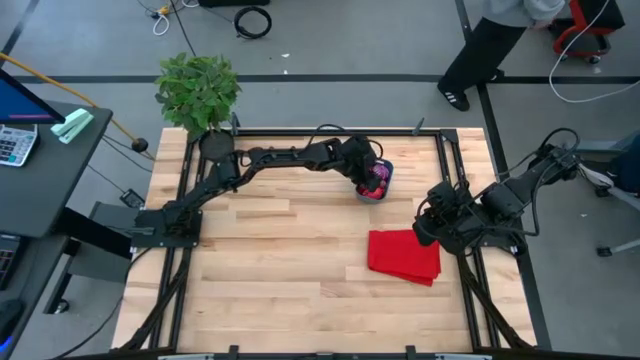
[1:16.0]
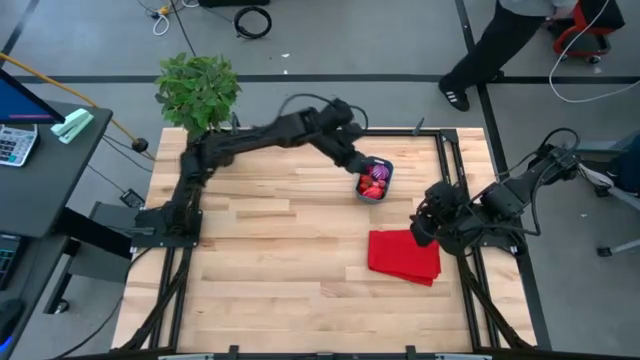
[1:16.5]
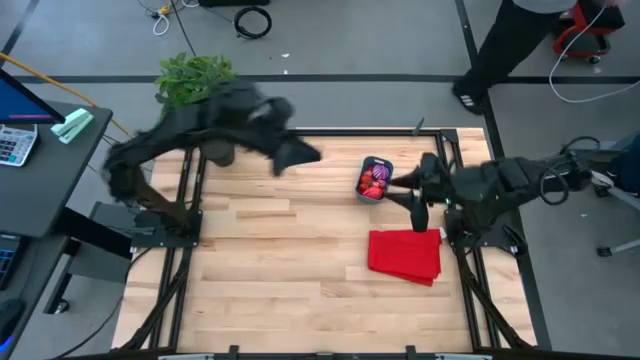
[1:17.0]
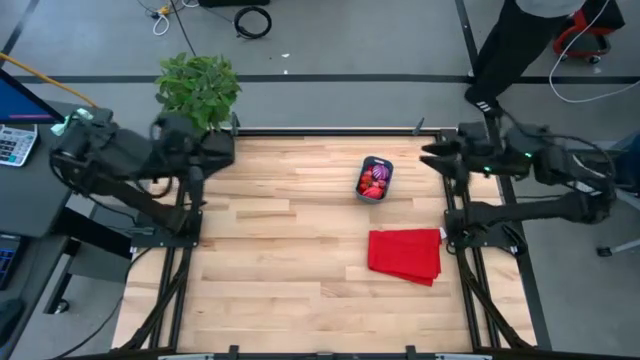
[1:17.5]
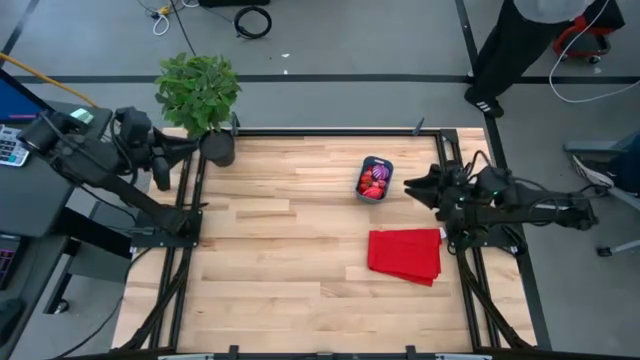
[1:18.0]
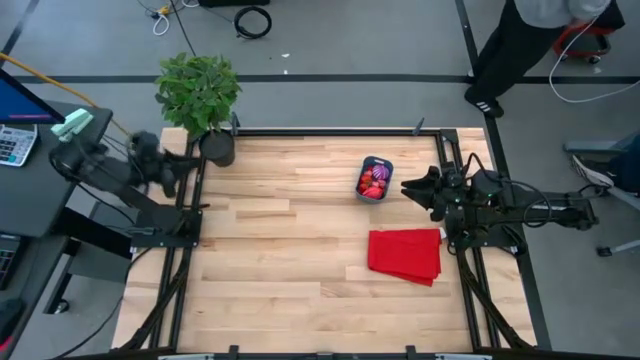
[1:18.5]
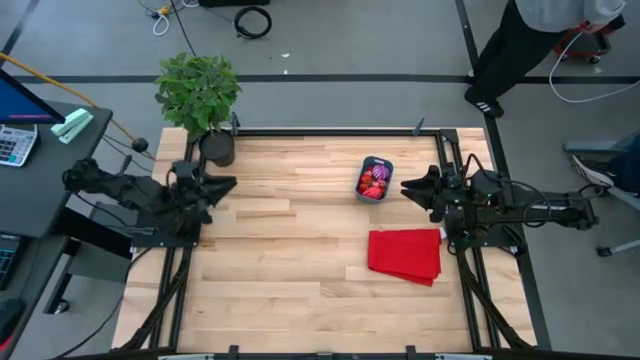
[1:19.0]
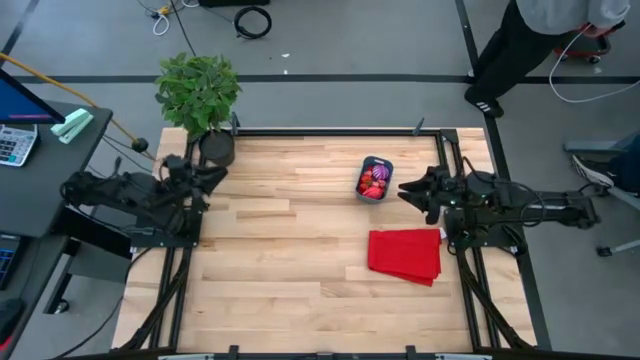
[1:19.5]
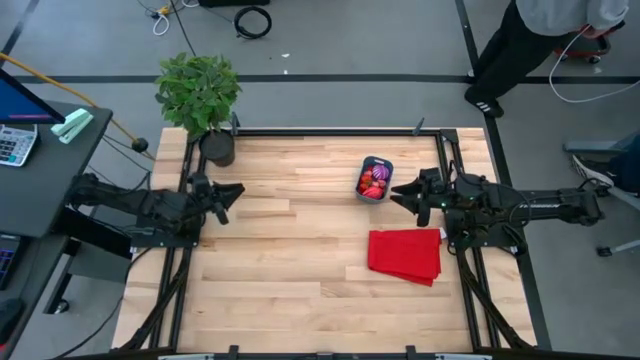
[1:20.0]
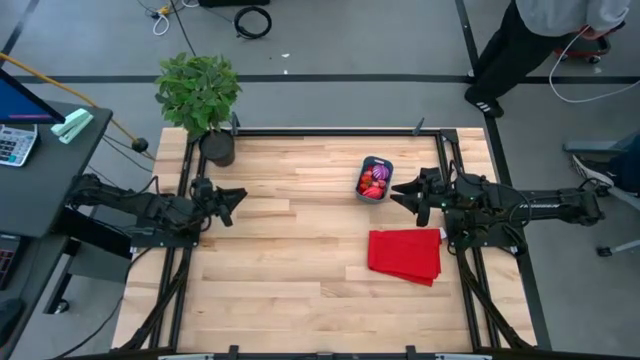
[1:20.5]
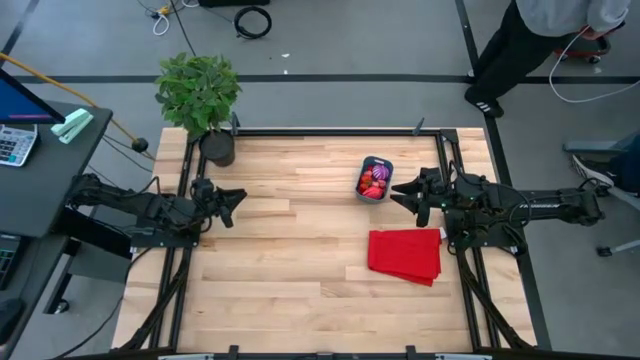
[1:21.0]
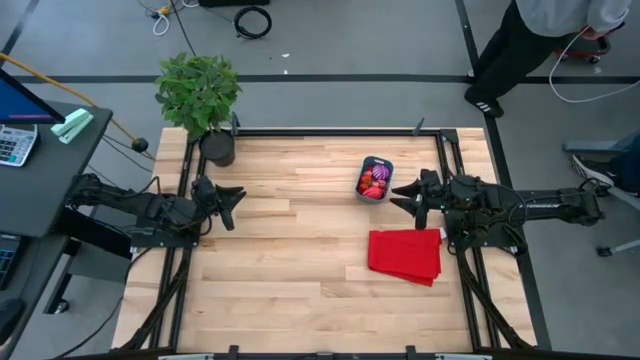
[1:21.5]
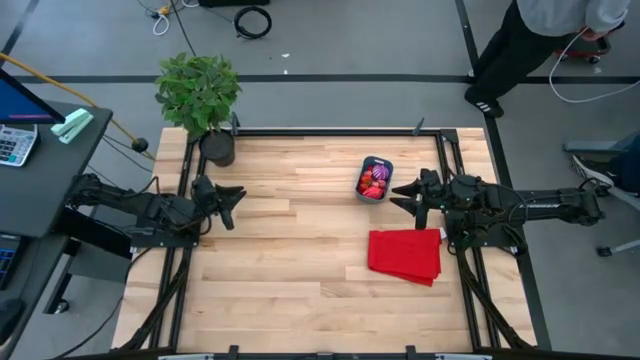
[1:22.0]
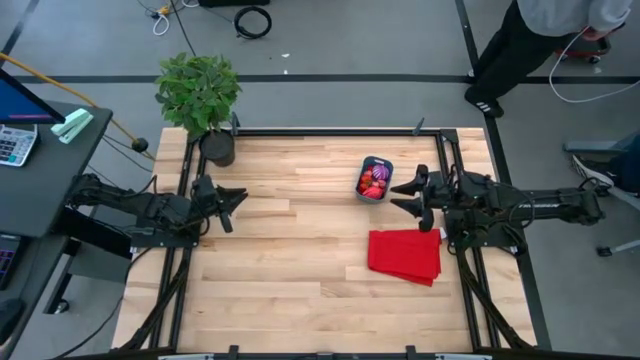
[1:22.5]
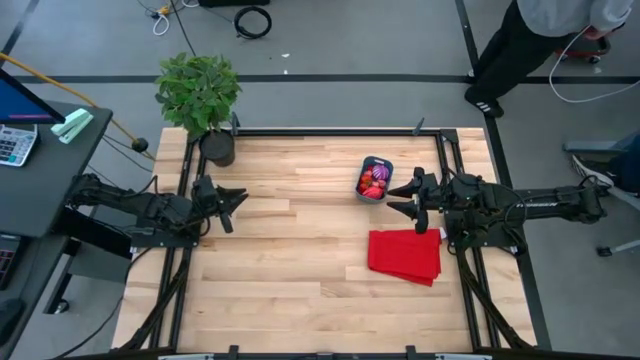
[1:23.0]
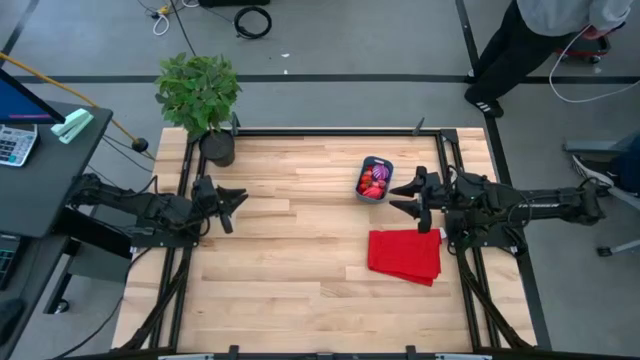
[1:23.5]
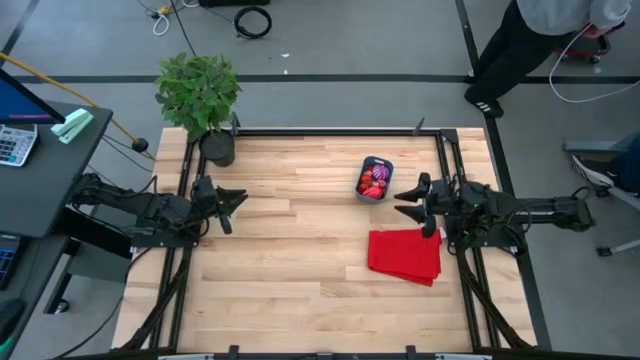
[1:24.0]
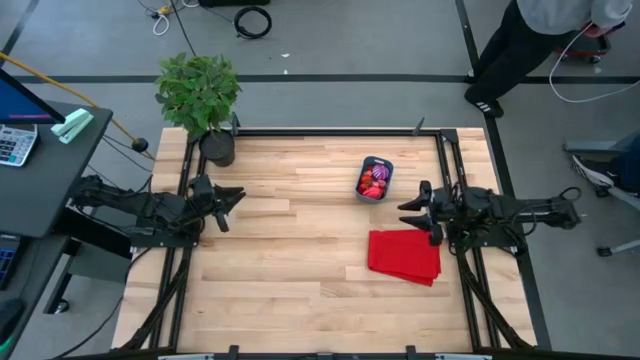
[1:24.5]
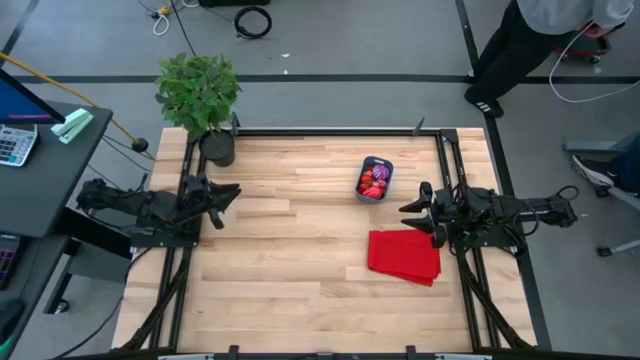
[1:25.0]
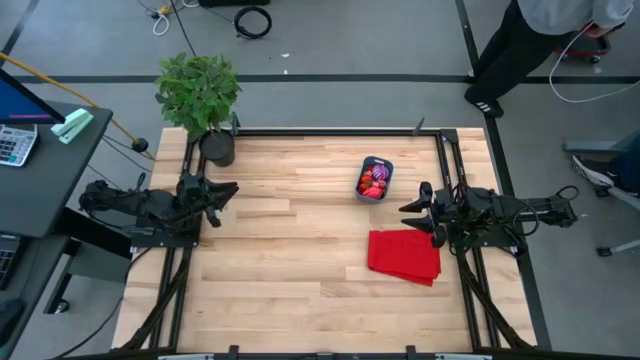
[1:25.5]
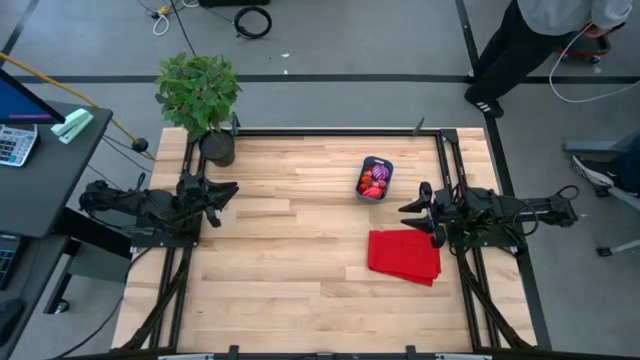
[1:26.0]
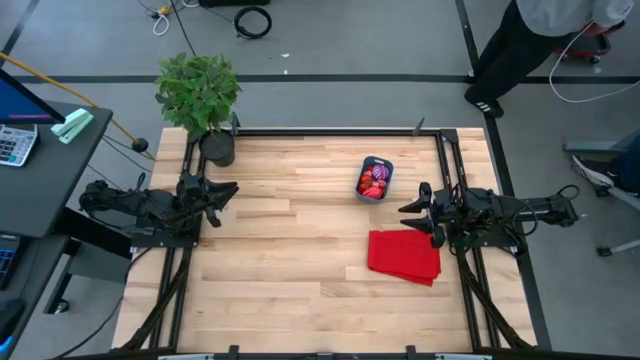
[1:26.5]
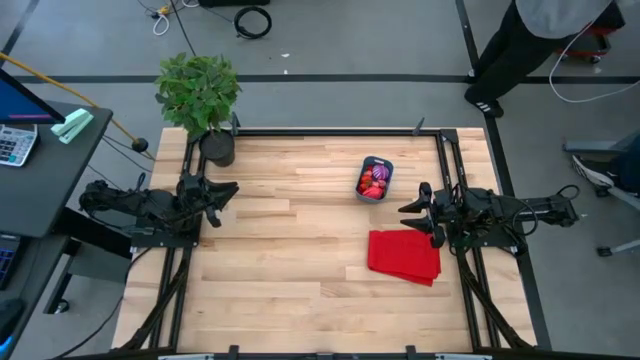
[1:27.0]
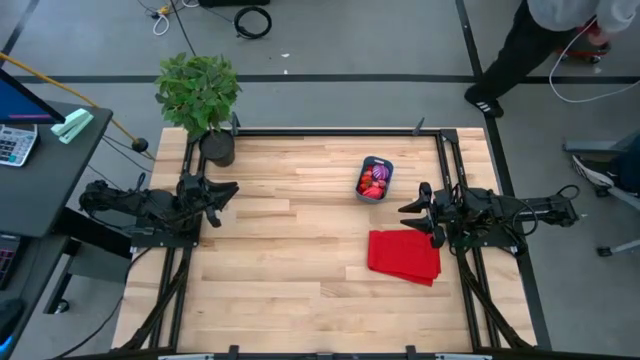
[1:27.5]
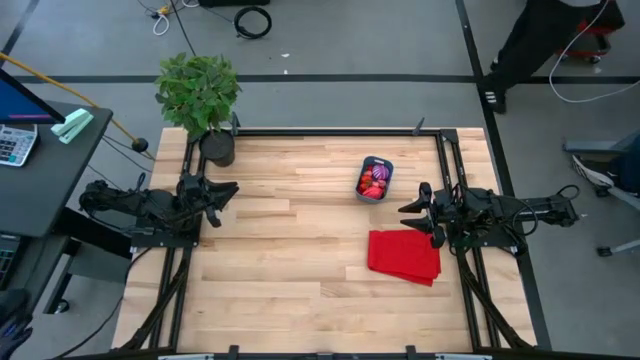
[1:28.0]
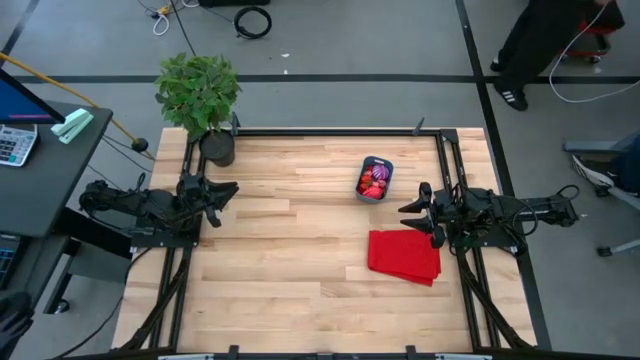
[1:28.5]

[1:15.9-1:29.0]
Task: Pick and placing Produce into tupperware
Return to Home Position

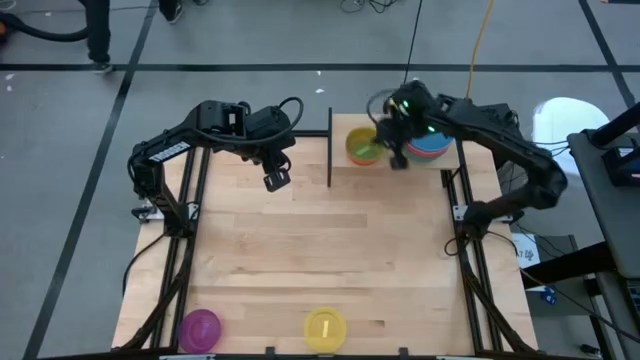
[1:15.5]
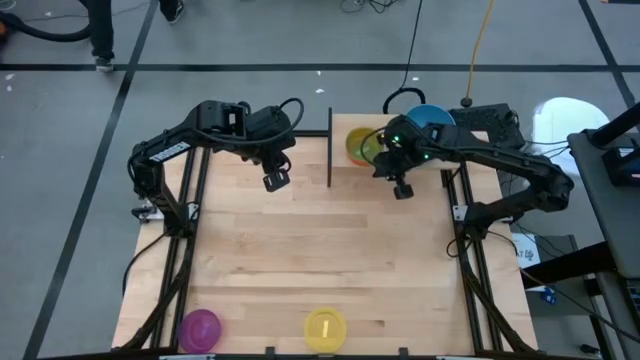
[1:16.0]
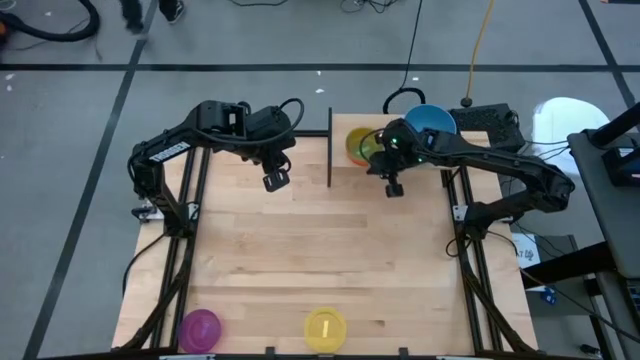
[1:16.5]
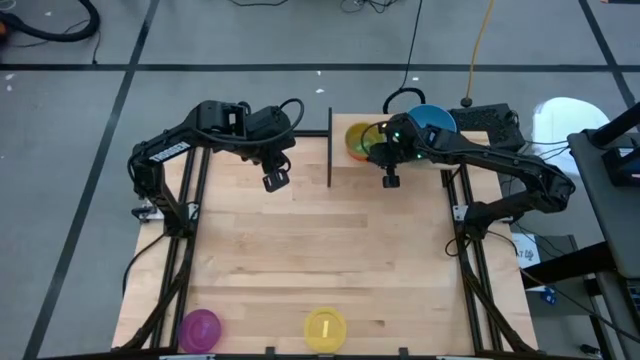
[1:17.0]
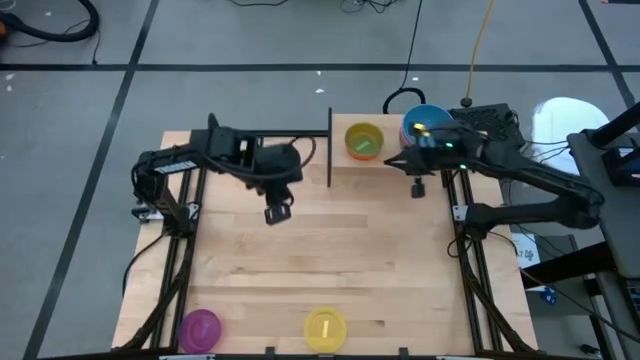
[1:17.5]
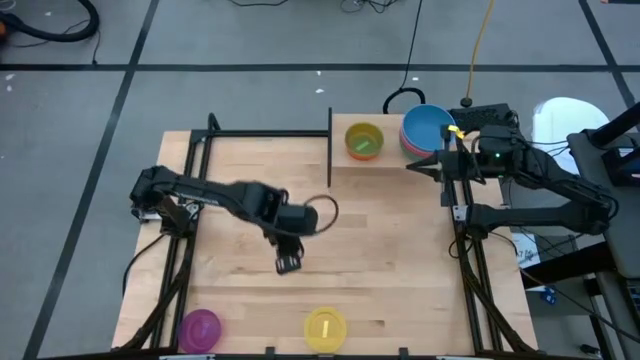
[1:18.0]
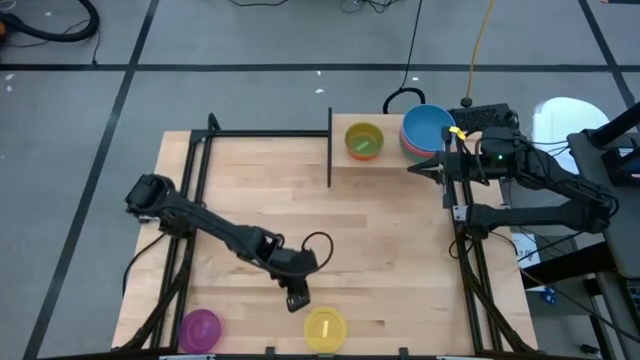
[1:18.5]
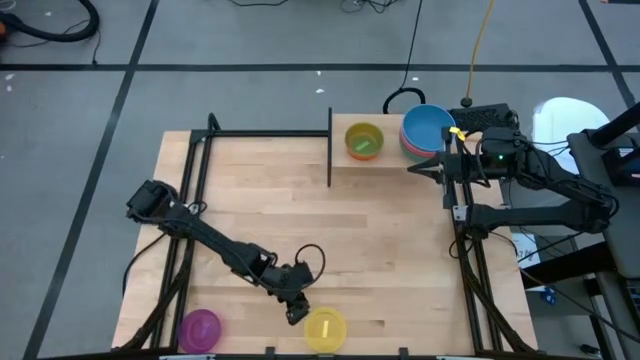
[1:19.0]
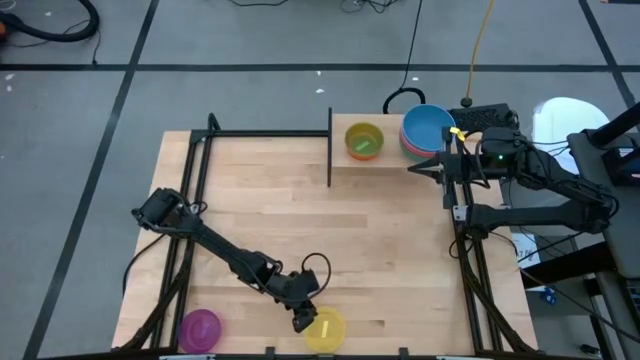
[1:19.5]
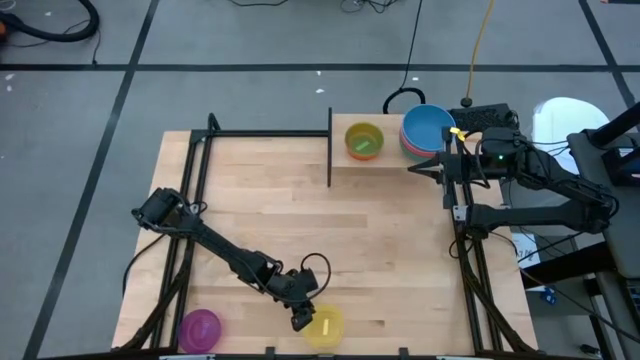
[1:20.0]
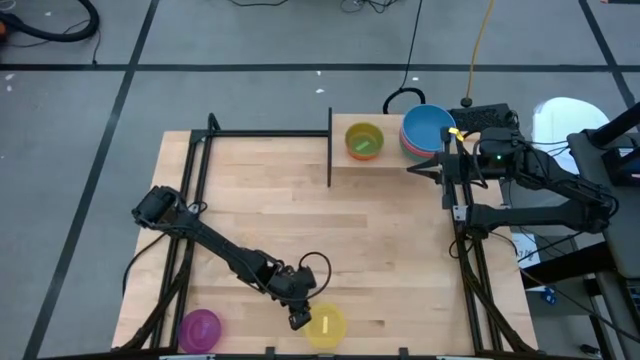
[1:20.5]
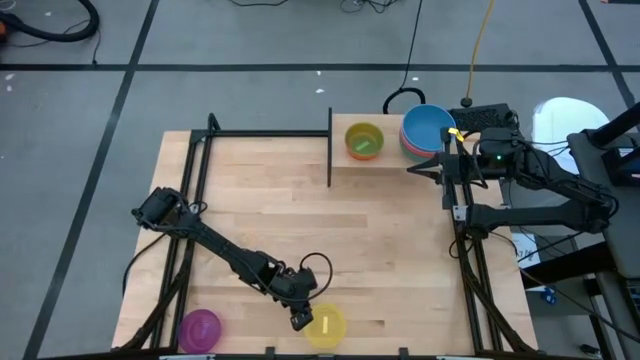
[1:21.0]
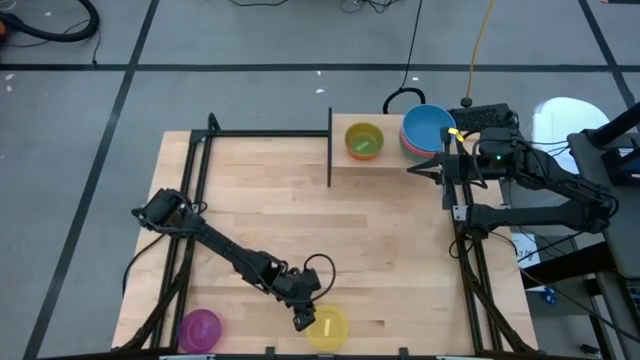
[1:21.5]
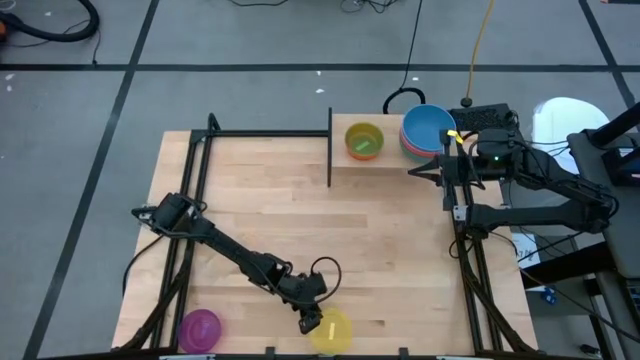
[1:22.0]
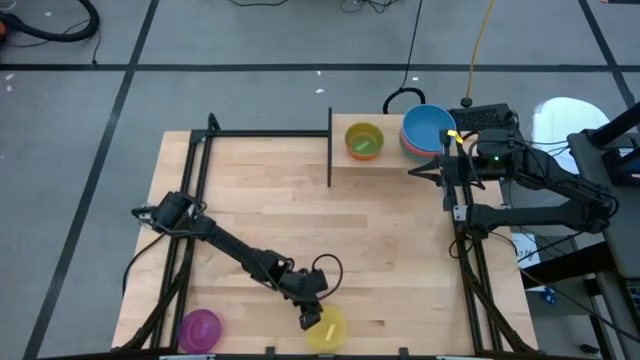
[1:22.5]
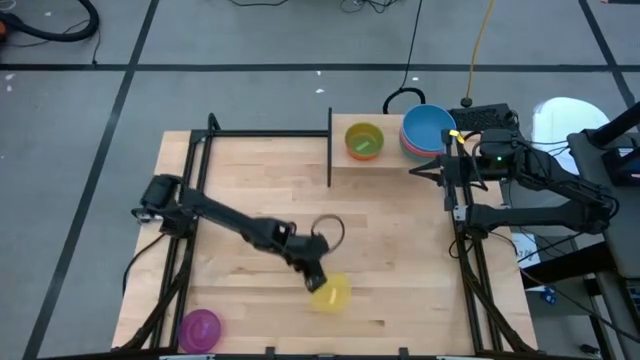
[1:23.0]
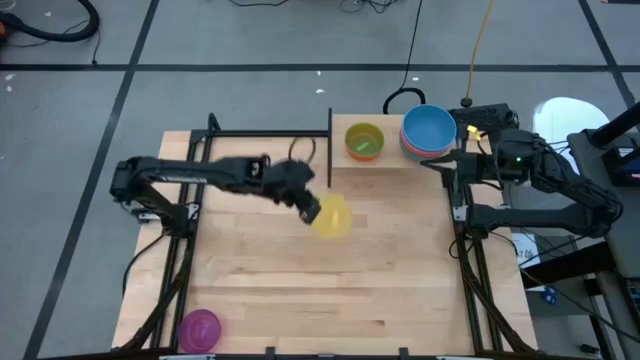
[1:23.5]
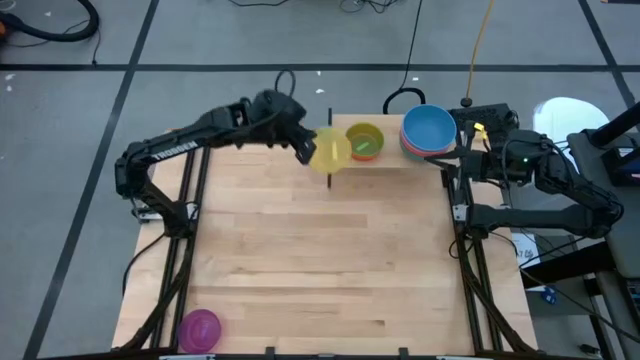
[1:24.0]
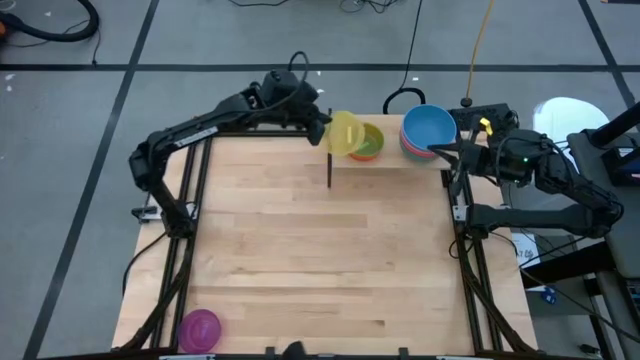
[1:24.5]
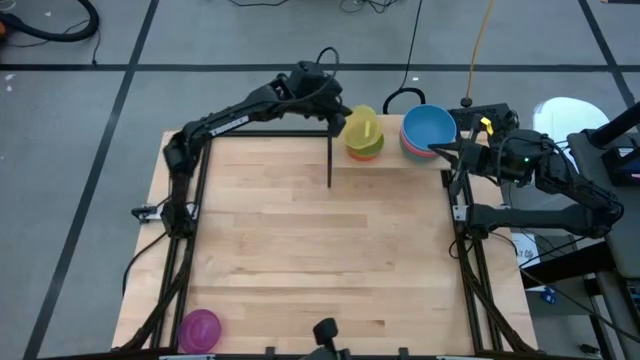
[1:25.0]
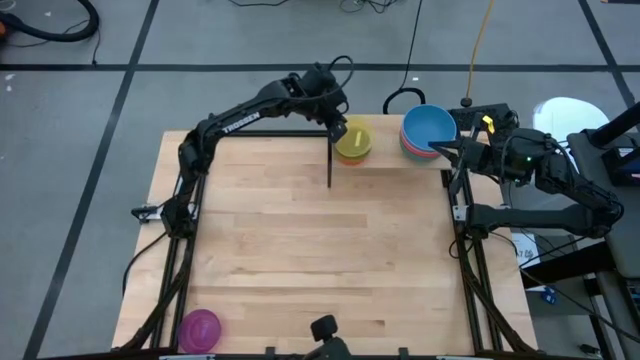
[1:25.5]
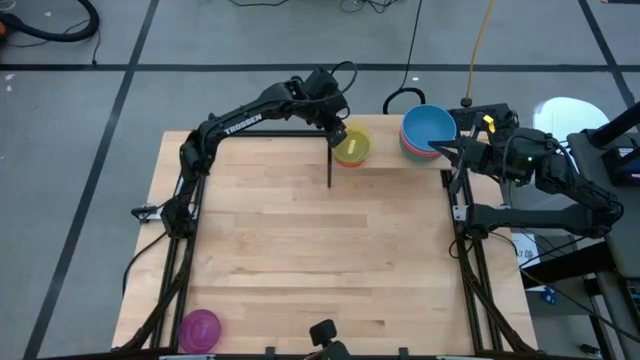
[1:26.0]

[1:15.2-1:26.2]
Task: Place and stack bowls onto a shelf
Stack the yellow bowl inside the green bowl on the shelf
